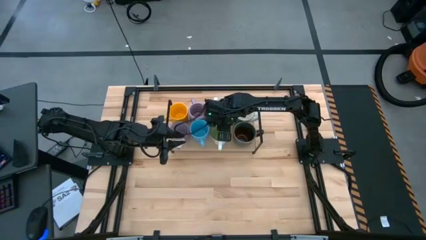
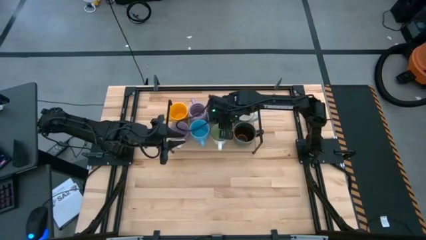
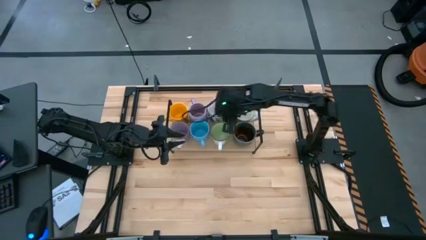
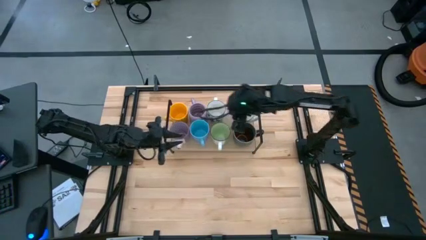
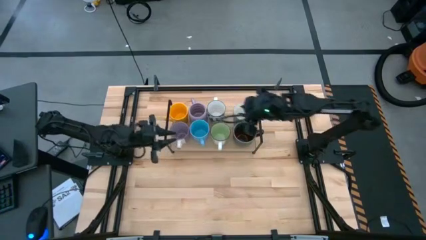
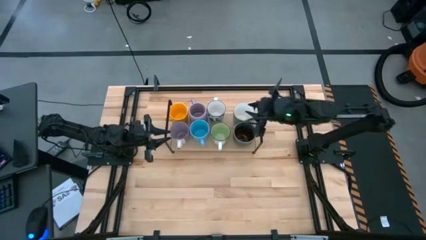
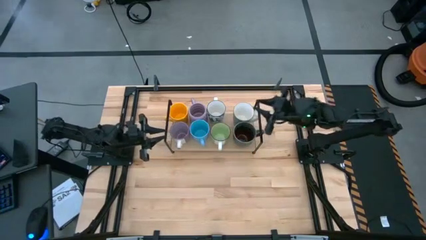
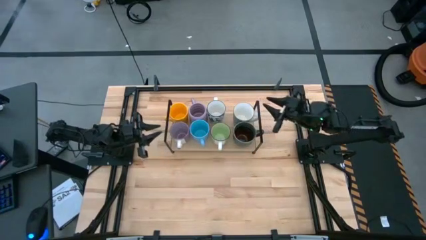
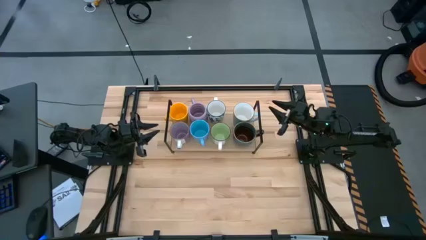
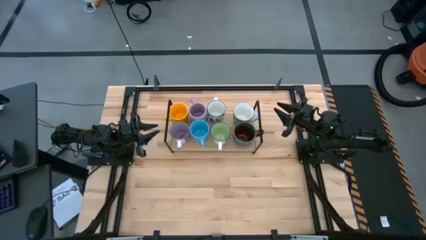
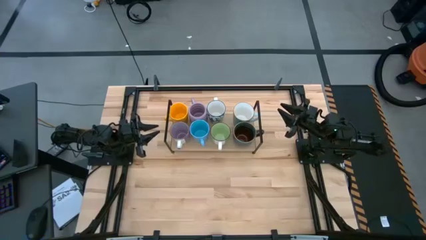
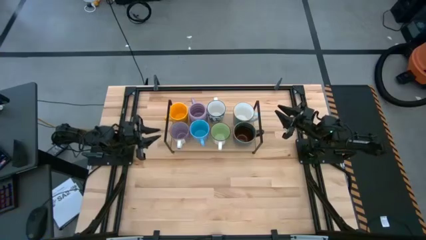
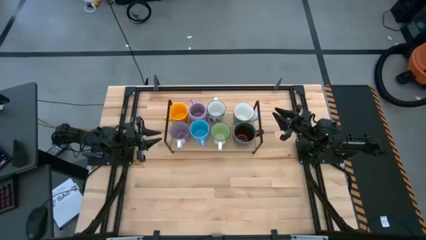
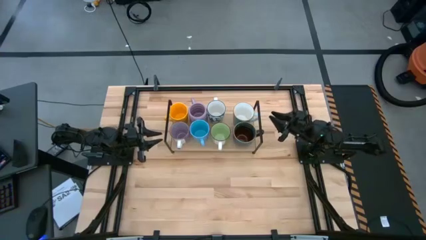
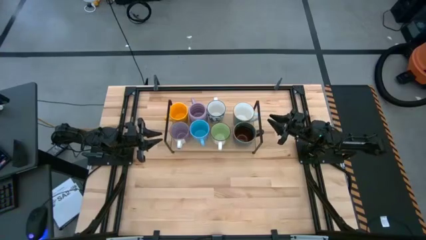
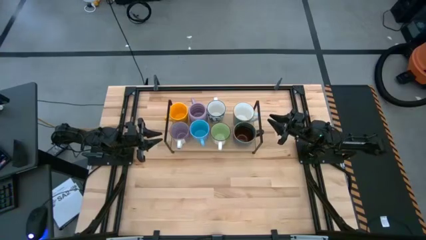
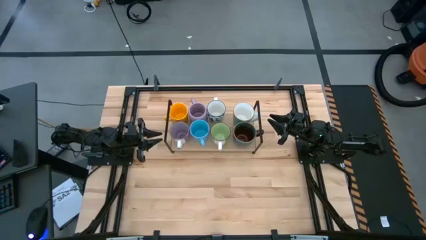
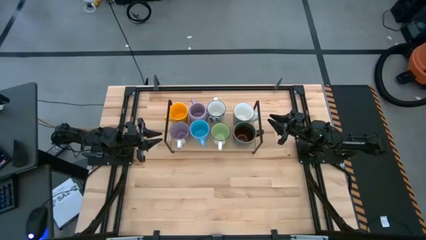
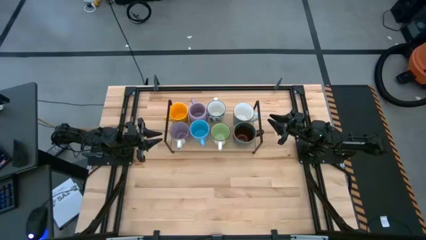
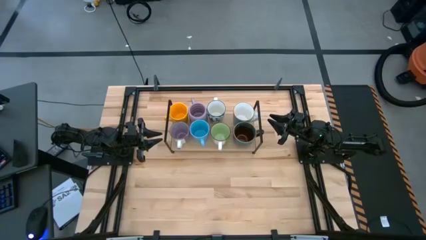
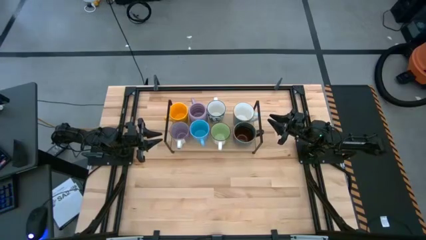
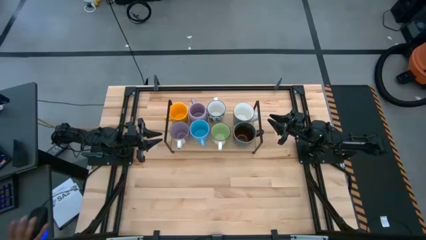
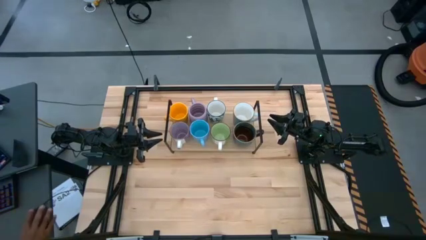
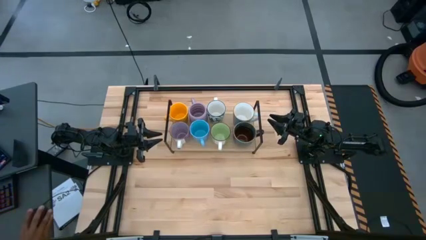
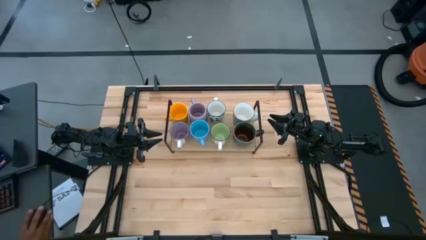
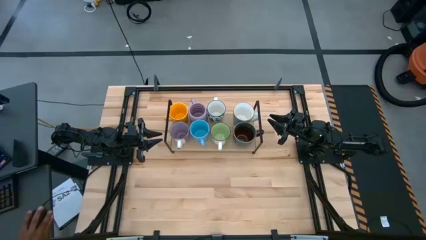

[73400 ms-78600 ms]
Task: Place coffee mugs
Return to Home Position

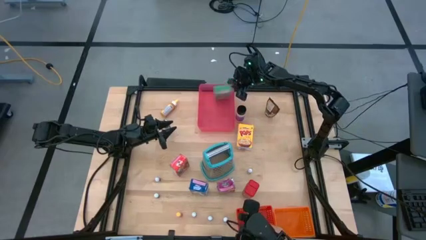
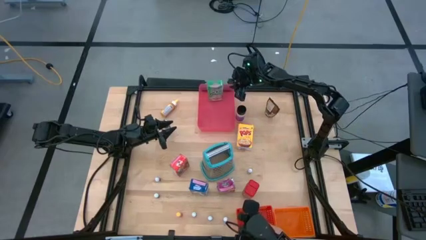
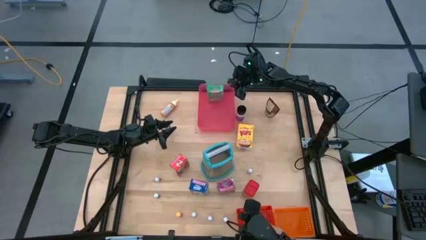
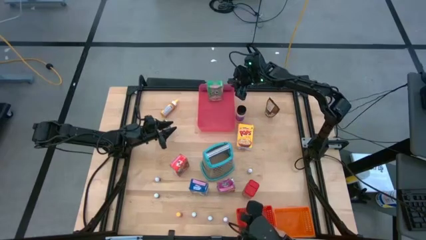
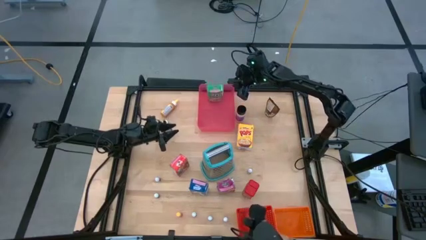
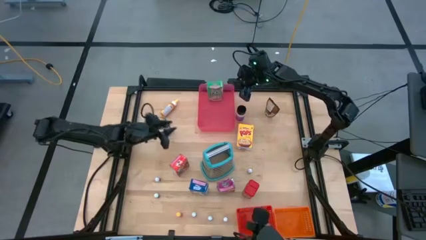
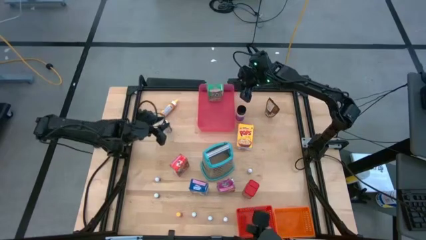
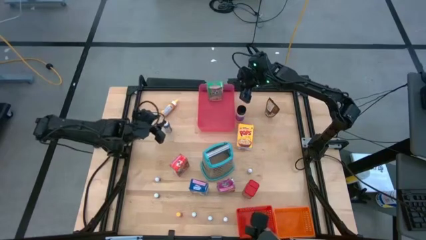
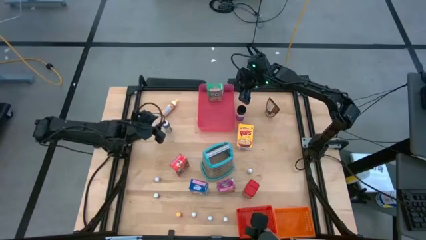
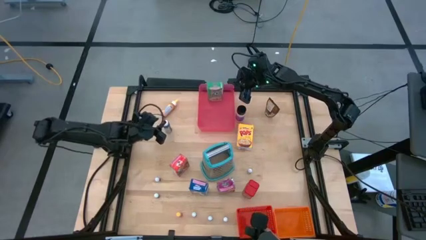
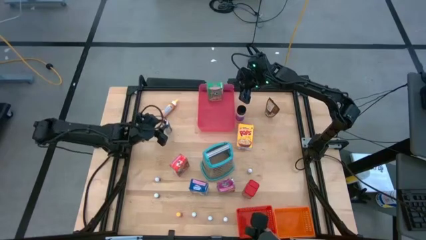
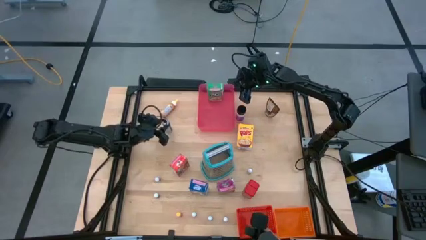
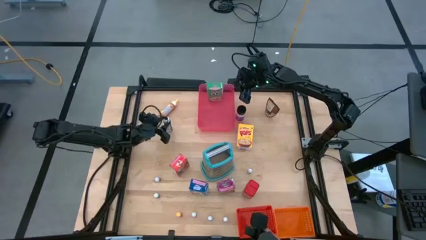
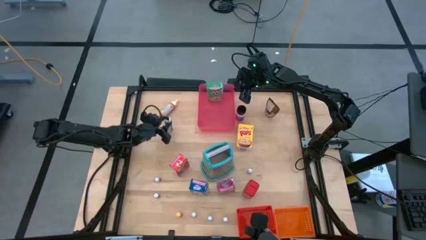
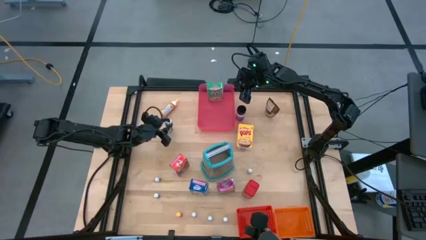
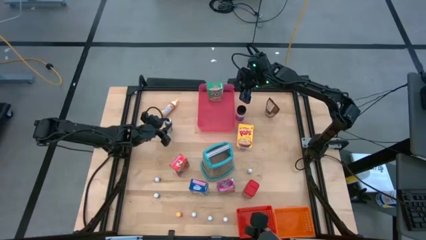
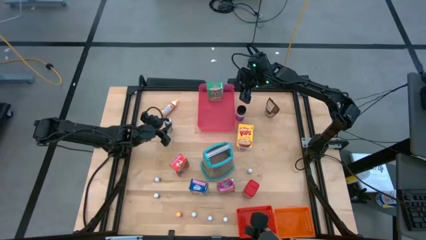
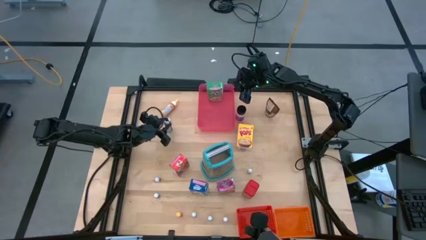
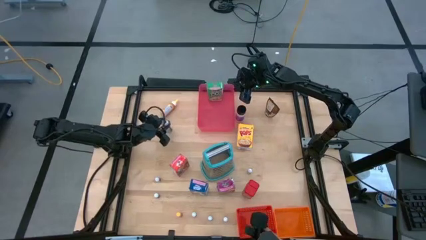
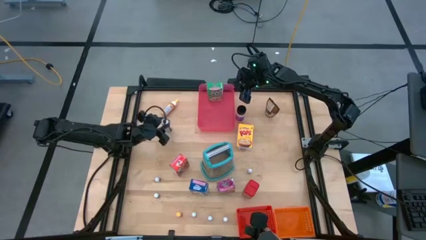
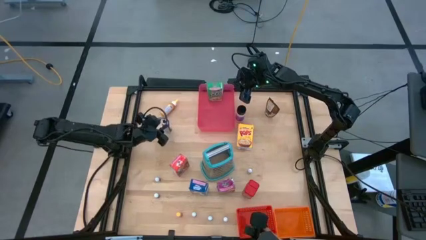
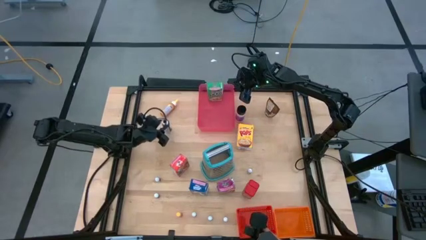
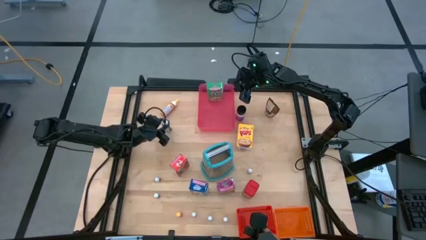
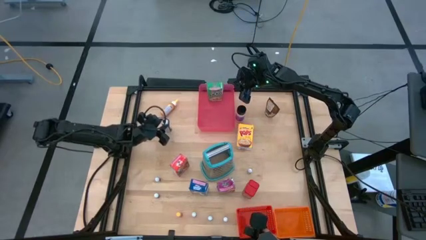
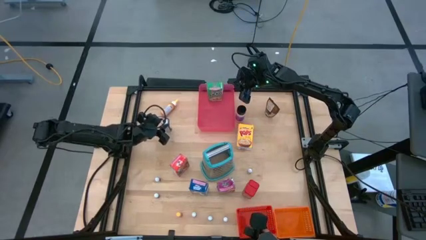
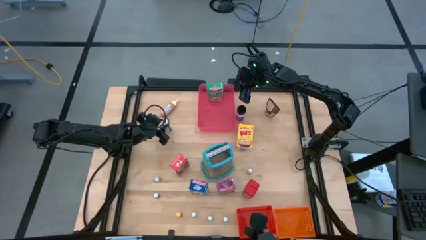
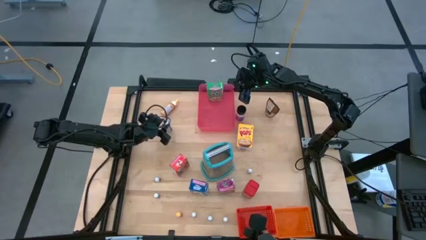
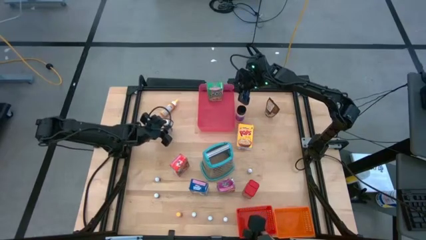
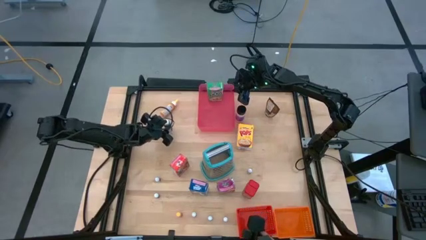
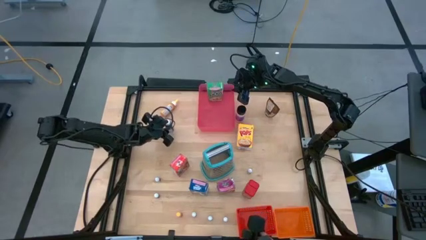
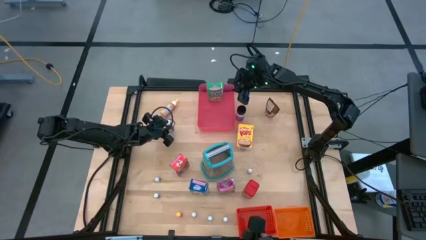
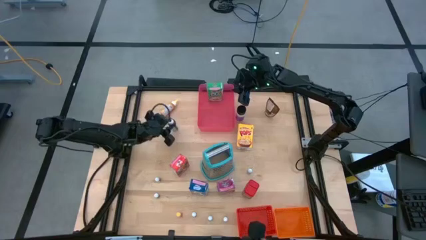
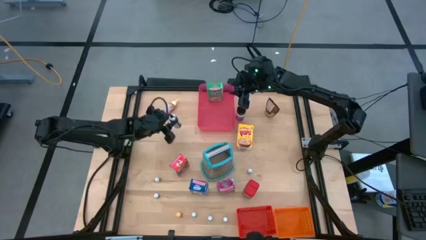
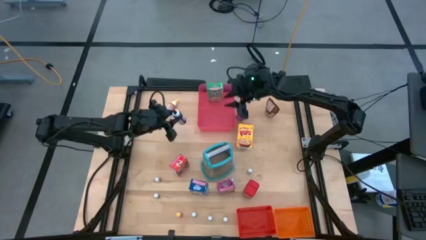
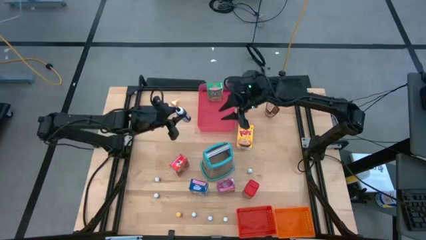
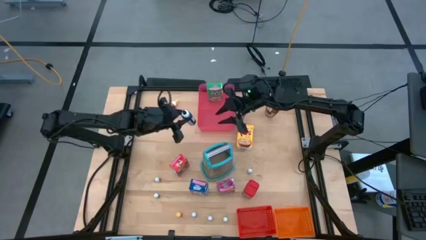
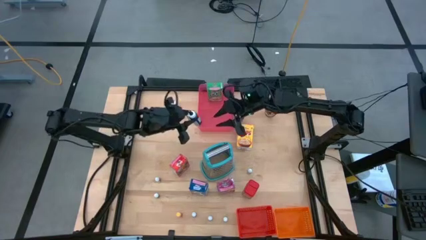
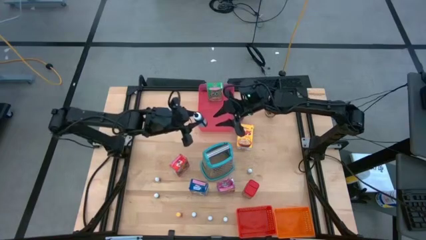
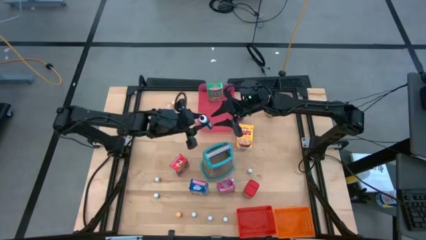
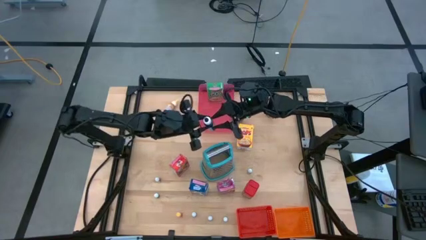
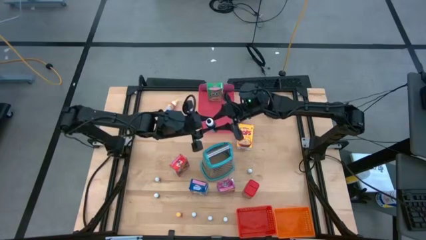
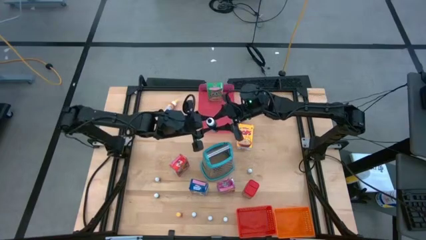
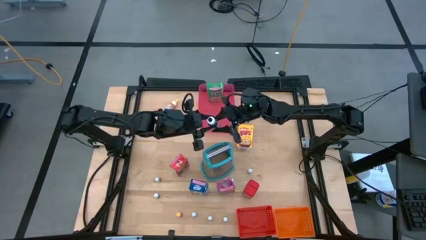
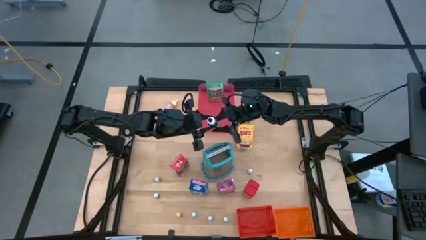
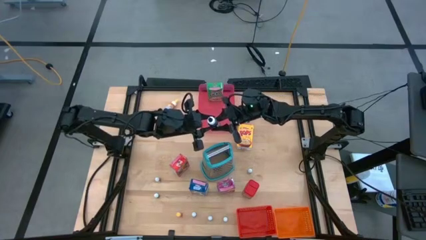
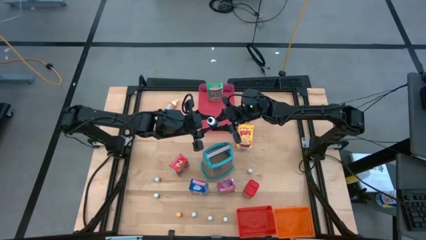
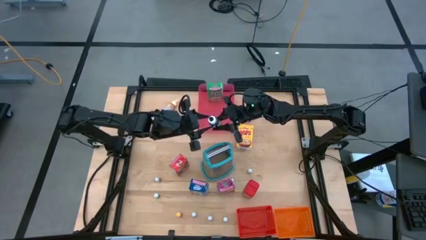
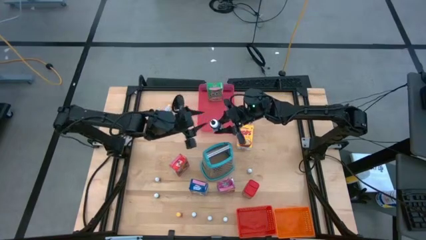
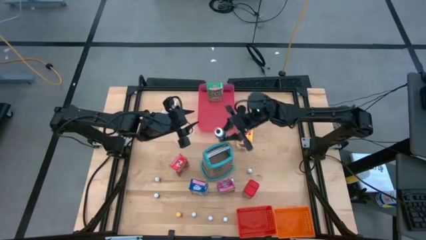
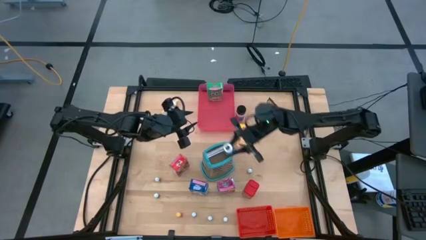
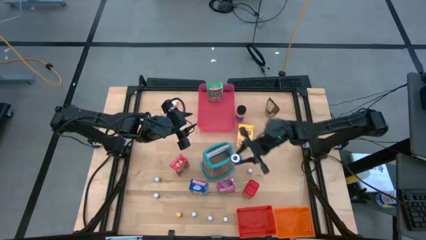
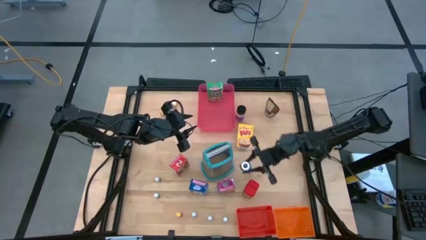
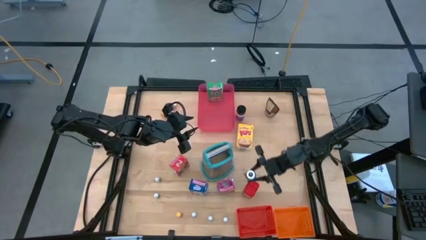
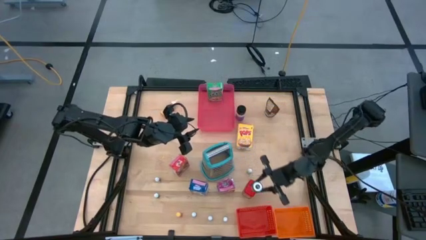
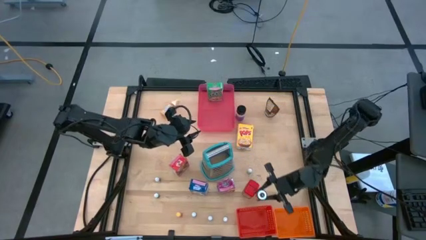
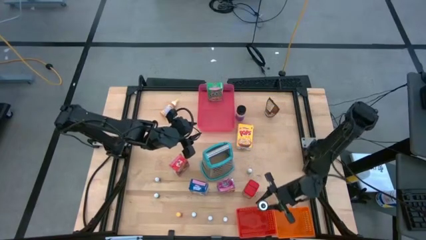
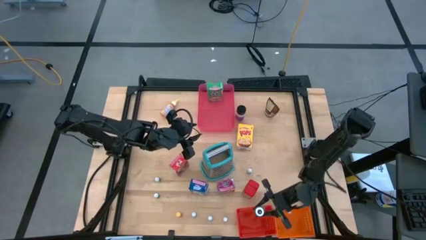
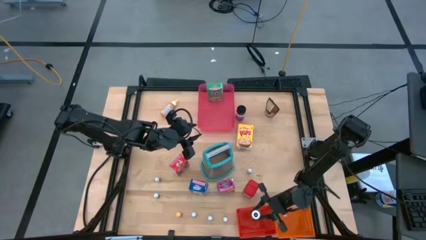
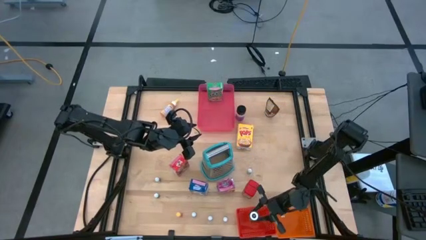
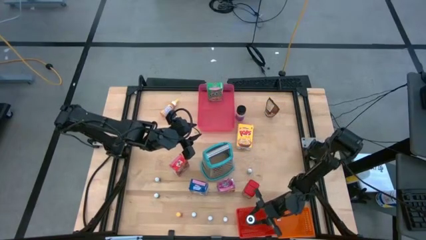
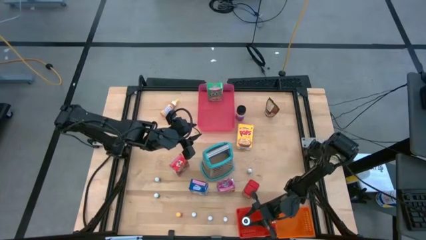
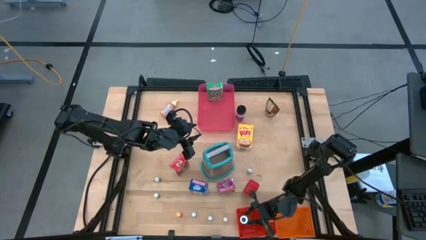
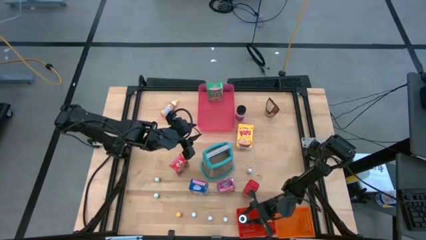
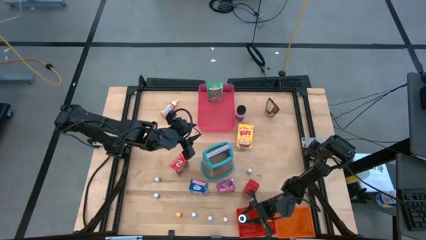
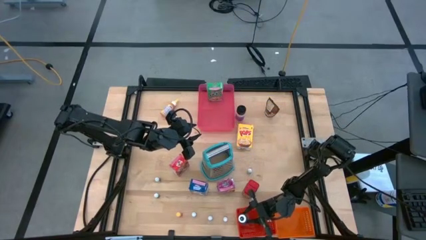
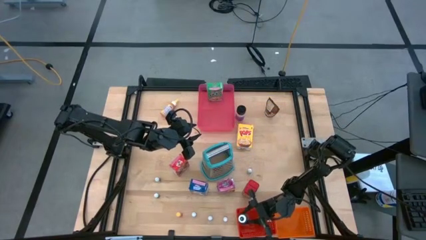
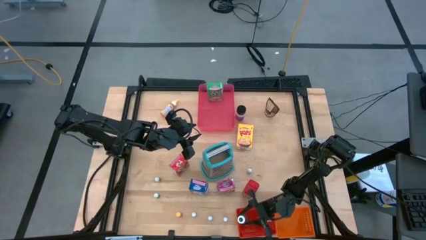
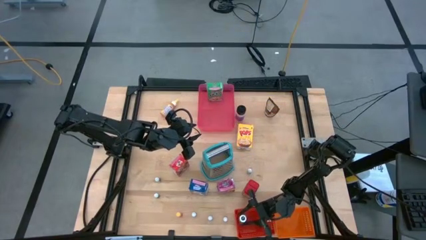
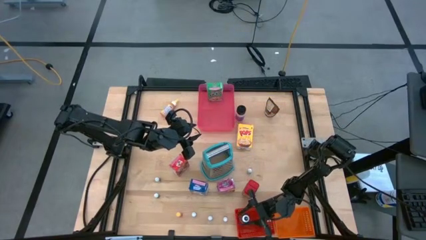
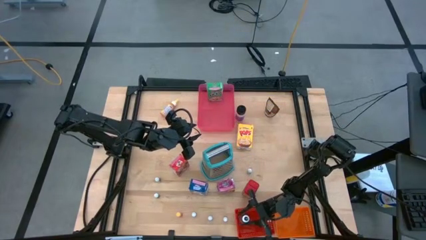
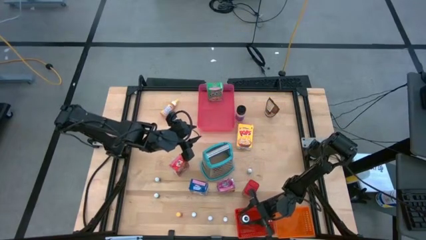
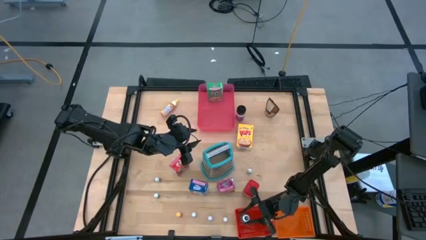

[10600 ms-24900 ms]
Task: Pick & Place Kitchen Items
Put the big black food coloring bottle into the red bin
